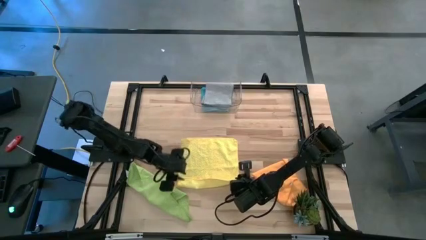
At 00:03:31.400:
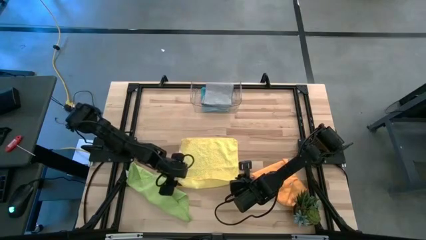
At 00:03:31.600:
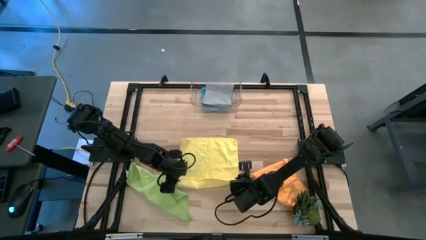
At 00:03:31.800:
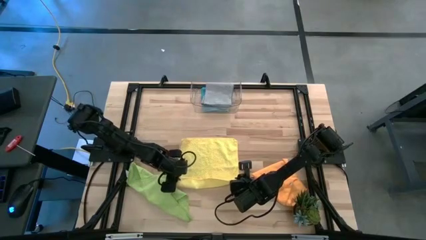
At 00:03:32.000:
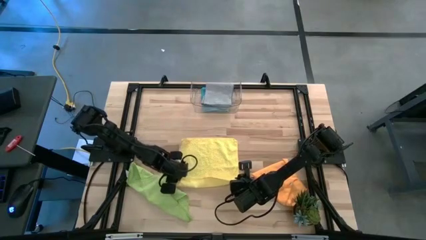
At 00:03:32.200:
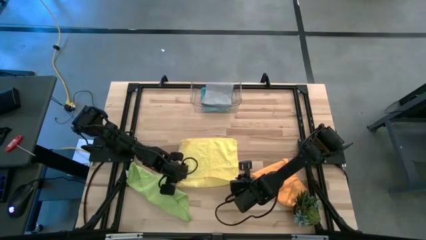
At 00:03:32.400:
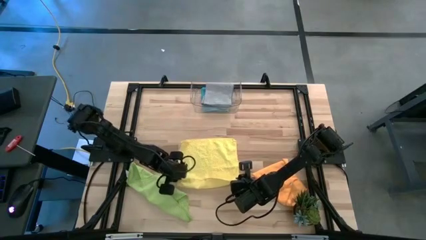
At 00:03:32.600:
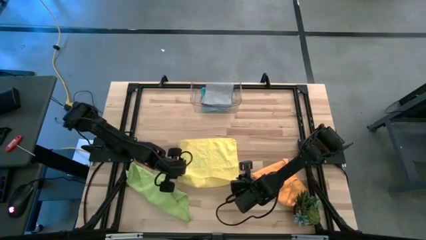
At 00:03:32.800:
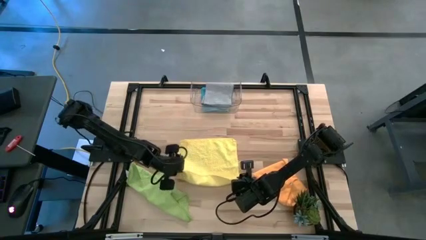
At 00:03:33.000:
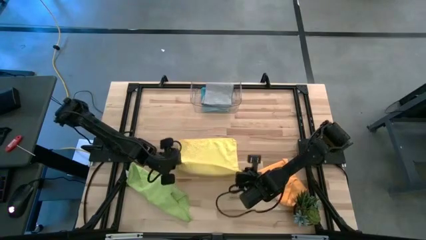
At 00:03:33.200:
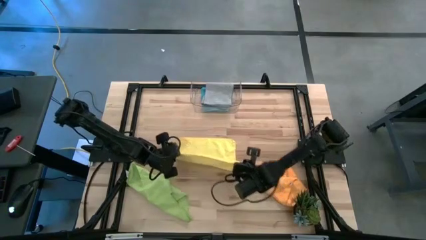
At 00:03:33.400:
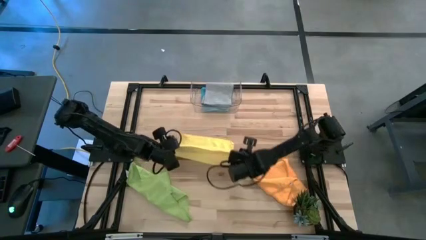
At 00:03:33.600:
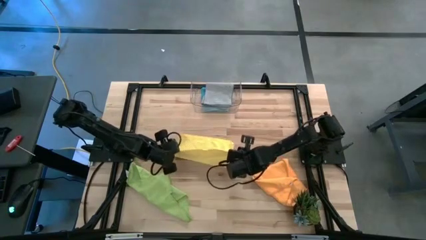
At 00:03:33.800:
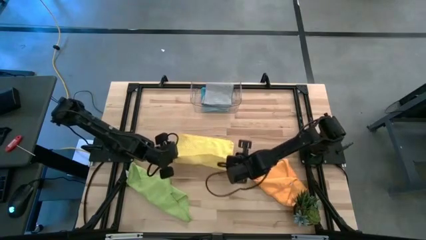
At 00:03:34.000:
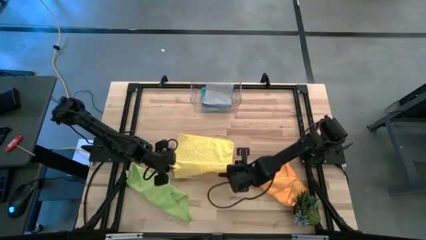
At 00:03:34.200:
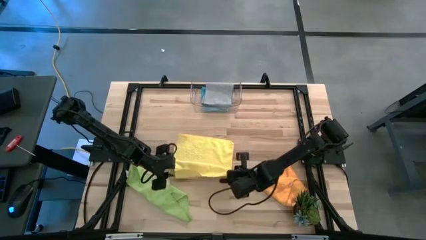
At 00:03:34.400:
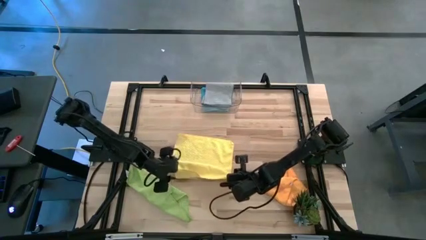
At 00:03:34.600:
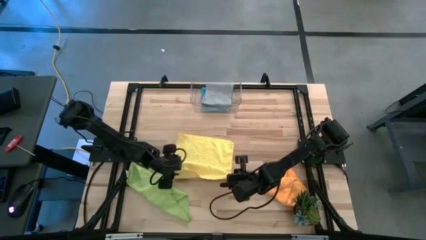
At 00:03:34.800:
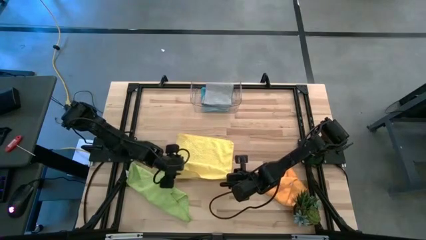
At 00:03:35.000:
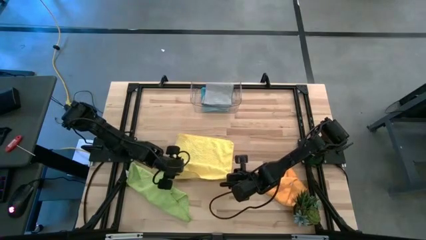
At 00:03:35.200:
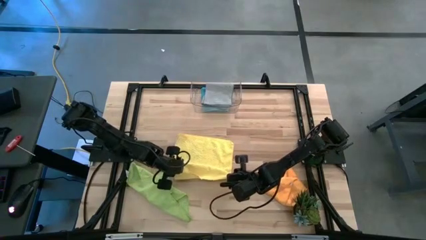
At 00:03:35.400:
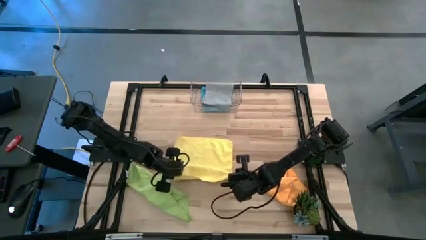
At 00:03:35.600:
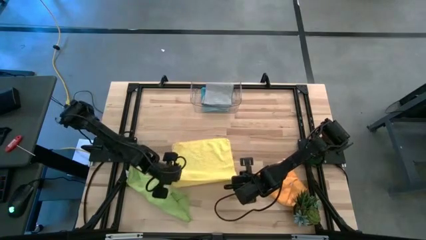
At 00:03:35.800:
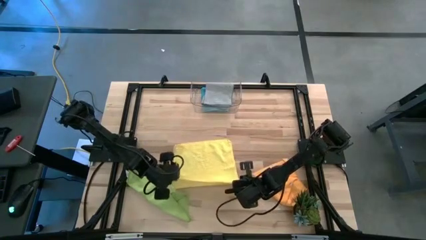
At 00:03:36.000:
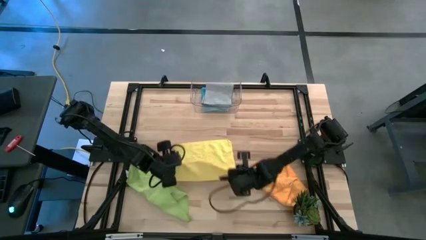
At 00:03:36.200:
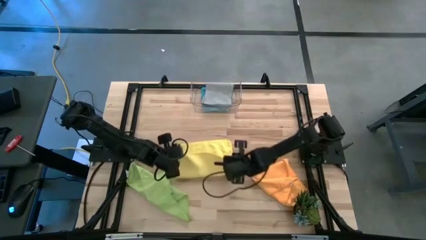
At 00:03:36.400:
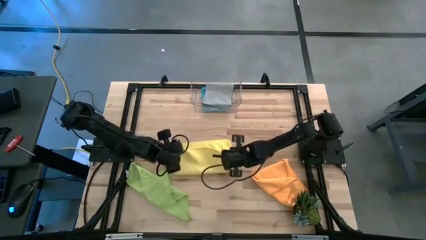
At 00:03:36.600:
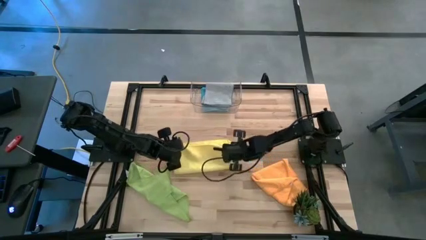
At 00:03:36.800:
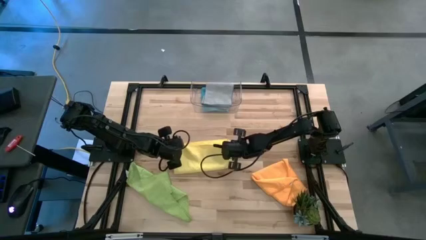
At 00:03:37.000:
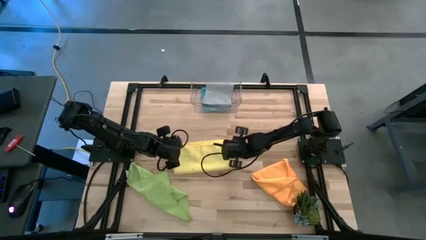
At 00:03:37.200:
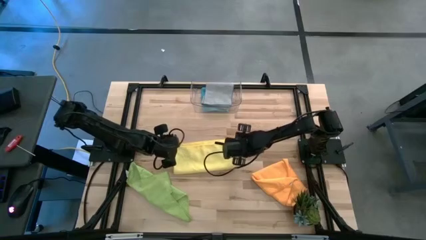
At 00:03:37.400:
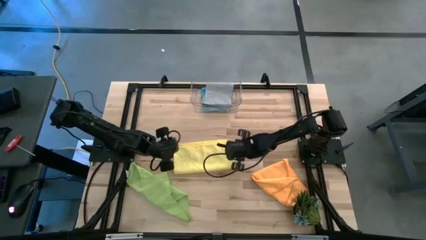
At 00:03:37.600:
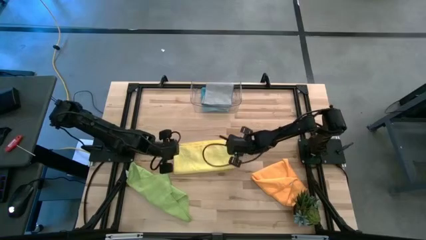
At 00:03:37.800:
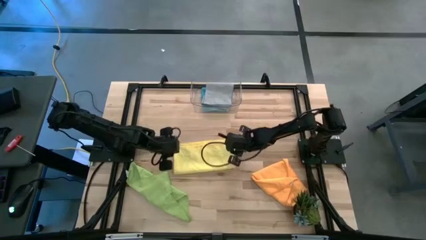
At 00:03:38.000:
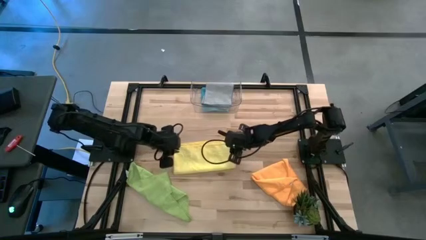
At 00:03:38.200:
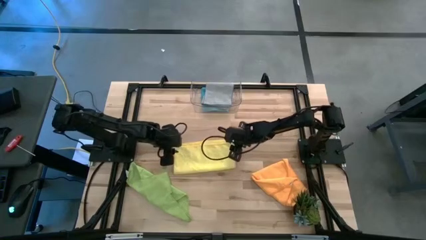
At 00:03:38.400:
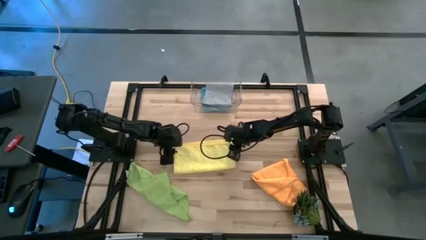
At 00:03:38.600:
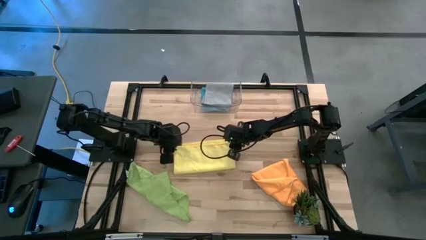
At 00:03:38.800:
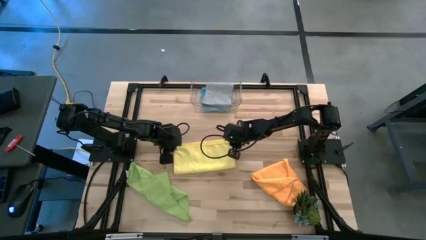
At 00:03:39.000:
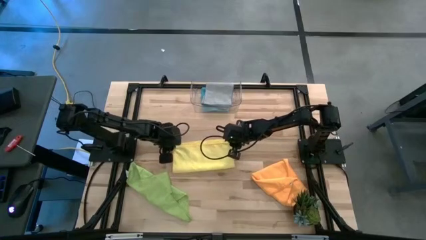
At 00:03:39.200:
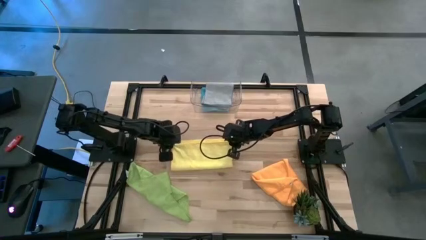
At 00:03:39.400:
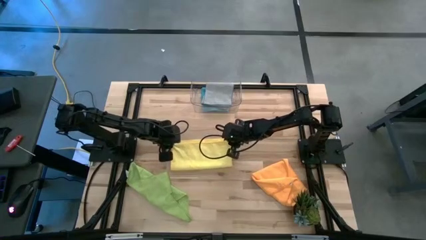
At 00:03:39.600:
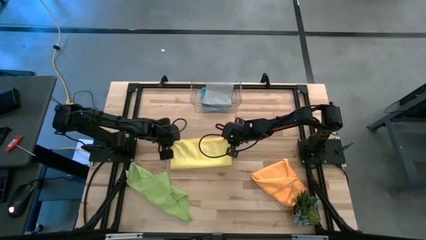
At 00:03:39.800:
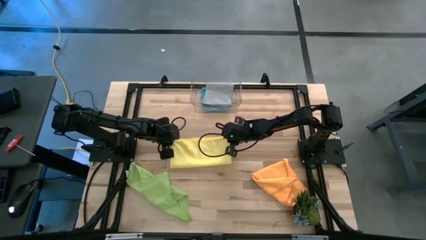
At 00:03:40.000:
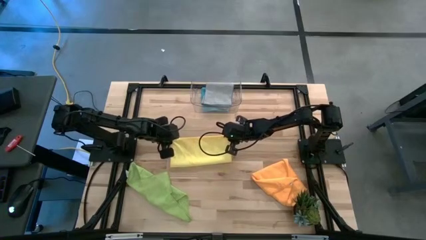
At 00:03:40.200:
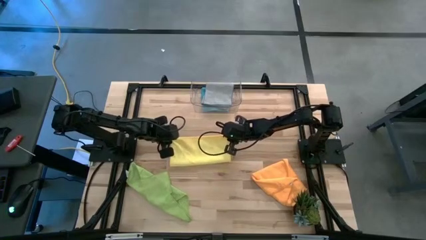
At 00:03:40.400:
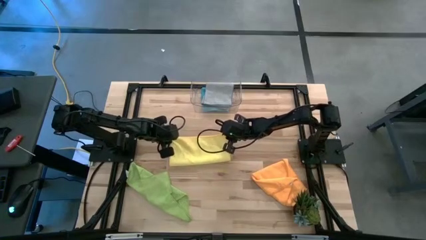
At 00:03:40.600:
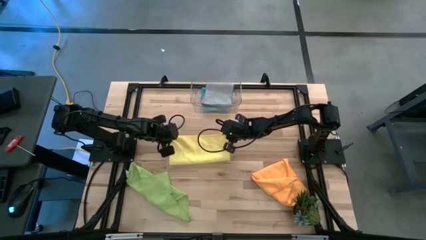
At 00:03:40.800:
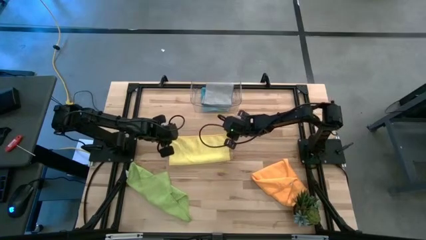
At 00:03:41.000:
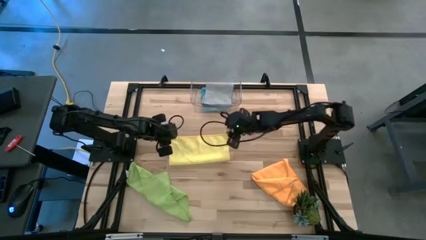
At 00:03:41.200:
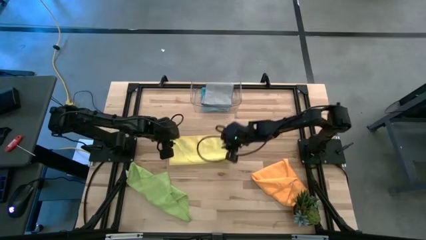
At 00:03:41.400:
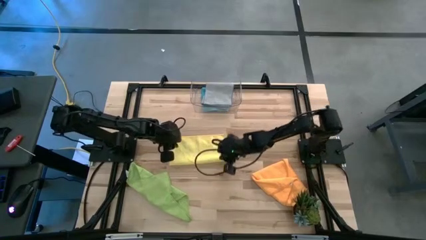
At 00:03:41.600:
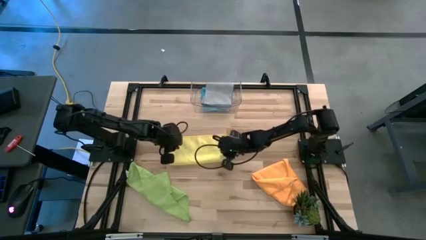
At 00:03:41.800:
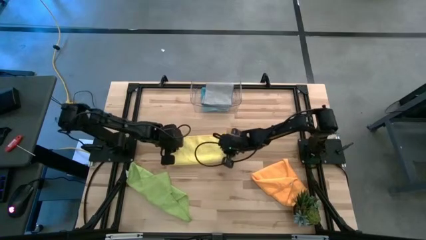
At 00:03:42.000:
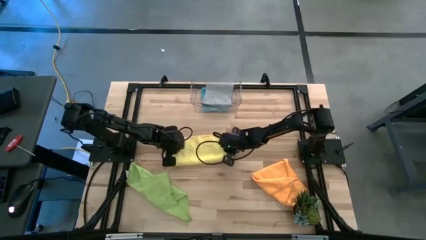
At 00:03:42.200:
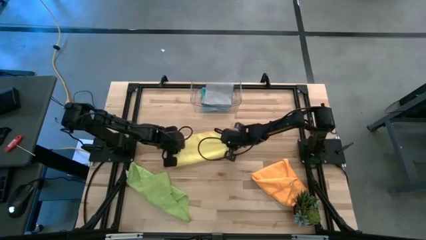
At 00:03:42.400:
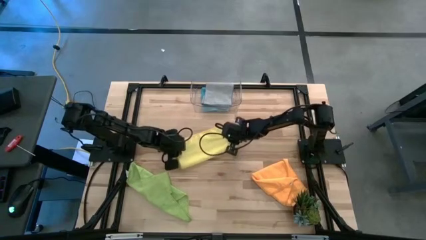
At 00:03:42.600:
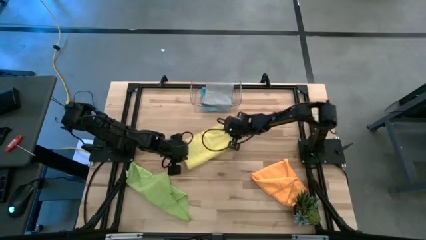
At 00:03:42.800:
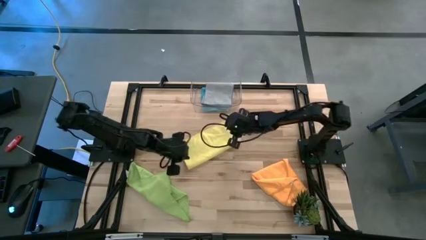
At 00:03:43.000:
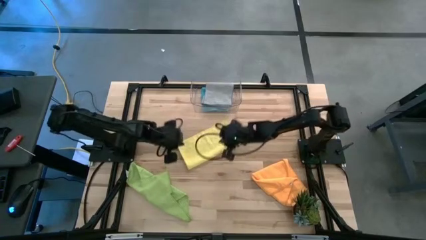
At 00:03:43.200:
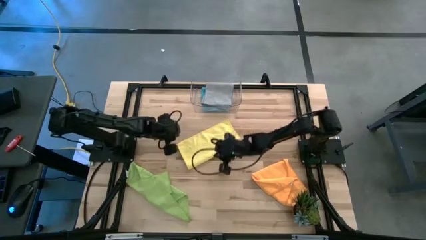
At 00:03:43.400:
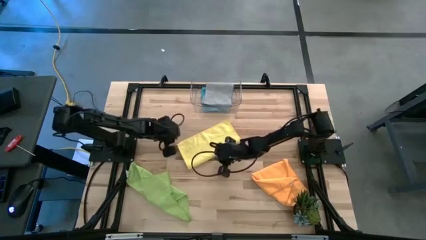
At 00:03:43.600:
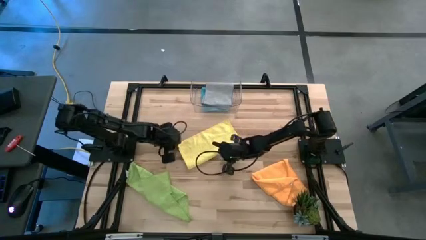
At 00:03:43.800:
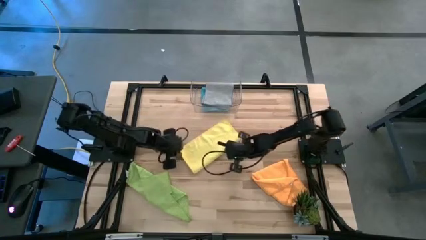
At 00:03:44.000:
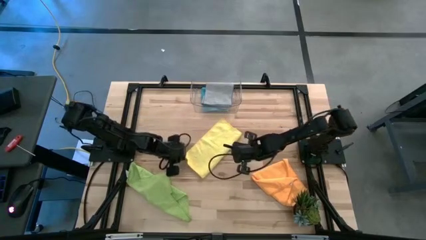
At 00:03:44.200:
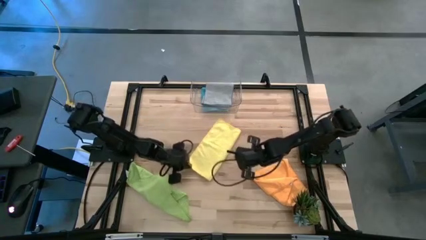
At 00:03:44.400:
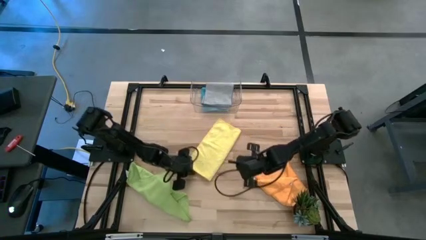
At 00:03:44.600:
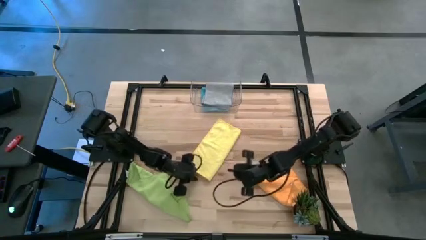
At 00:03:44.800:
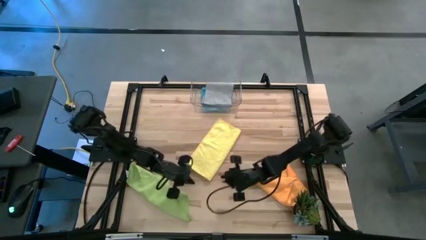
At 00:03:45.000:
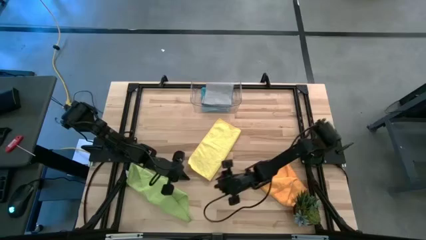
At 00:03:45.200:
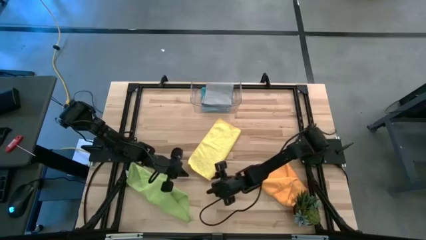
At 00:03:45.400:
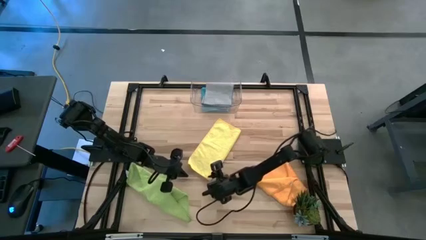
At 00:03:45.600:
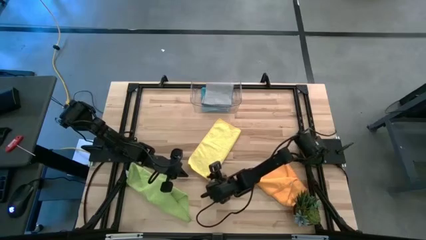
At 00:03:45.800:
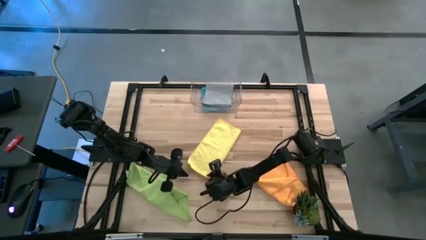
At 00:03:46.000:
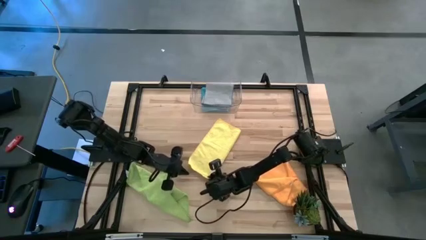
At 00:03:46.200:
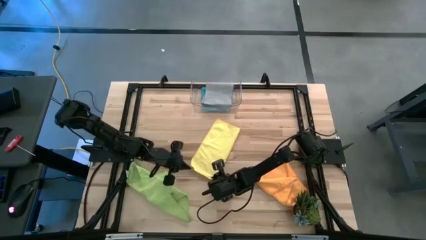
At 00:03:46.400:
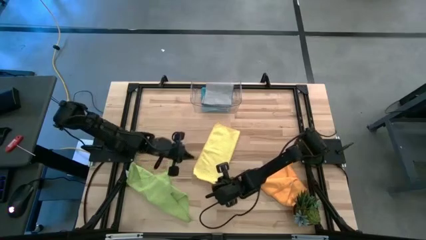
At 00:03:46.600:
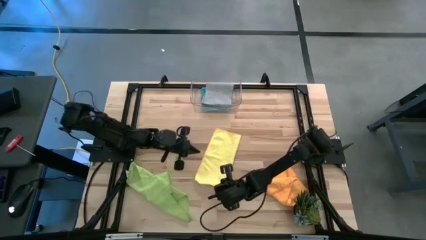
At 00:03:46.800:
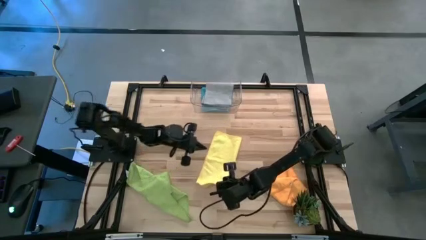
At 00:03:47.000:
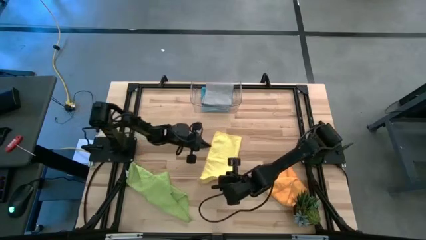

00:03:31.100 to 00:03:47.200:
Task: Fold microfiber towels
Fold the yellow towel
